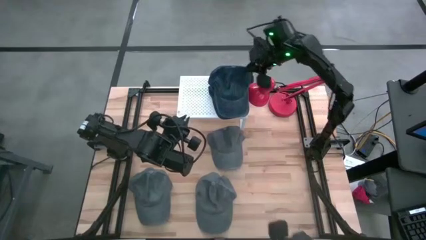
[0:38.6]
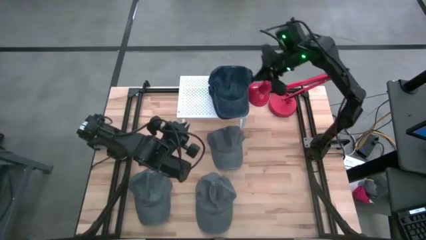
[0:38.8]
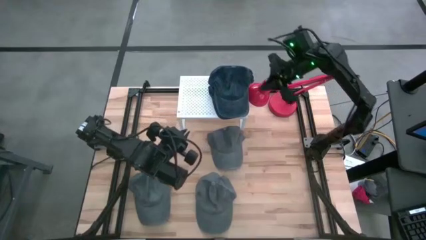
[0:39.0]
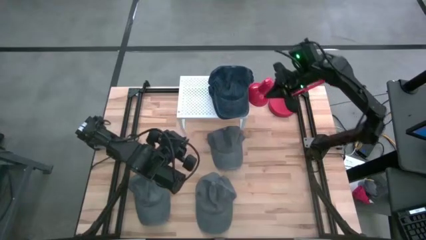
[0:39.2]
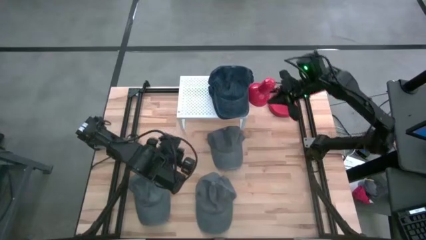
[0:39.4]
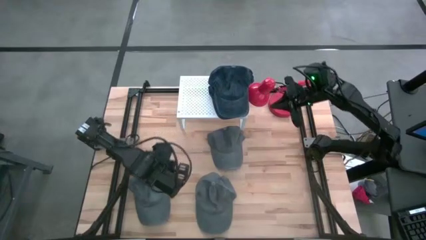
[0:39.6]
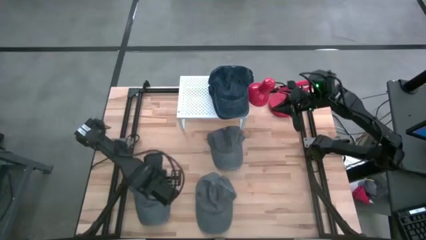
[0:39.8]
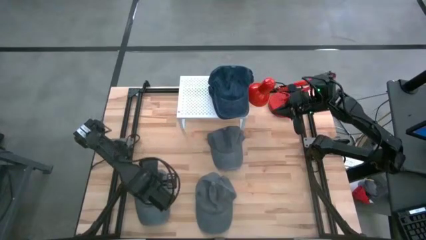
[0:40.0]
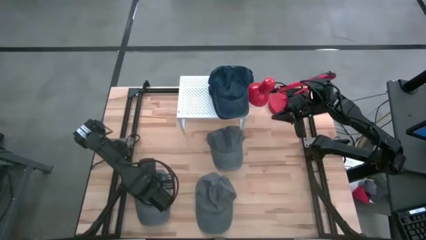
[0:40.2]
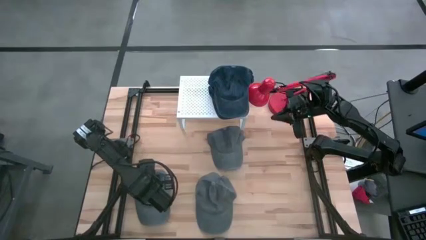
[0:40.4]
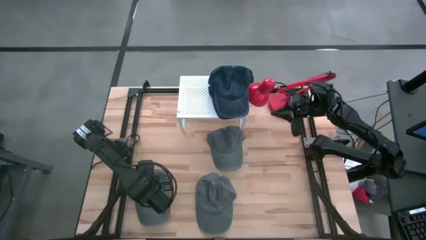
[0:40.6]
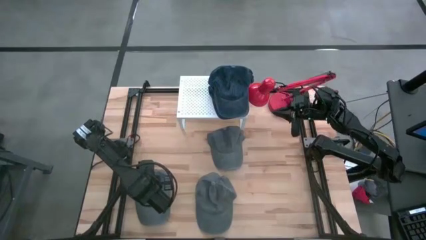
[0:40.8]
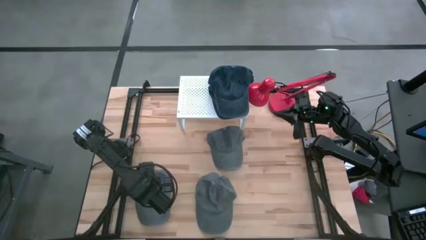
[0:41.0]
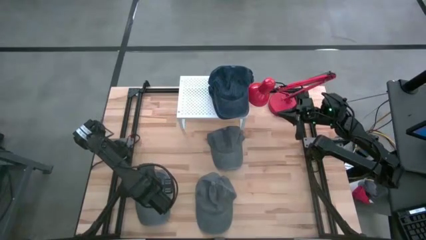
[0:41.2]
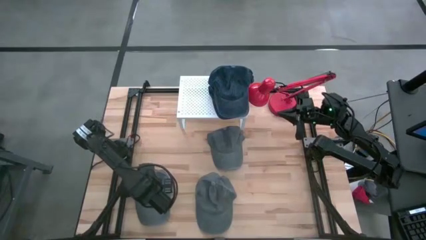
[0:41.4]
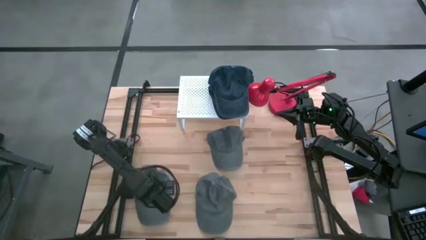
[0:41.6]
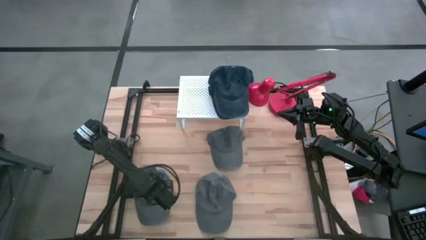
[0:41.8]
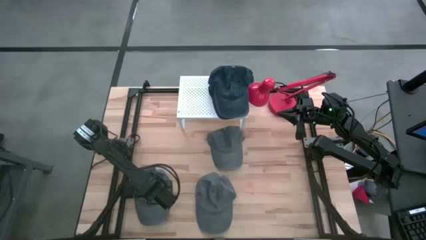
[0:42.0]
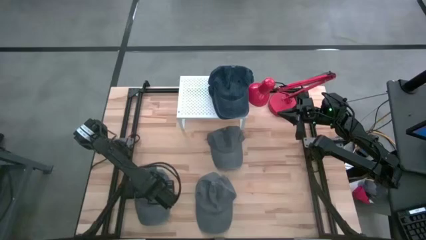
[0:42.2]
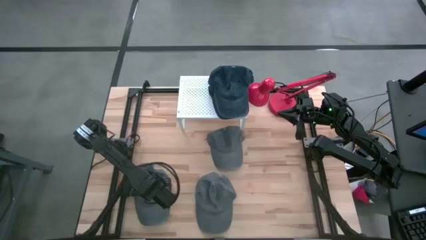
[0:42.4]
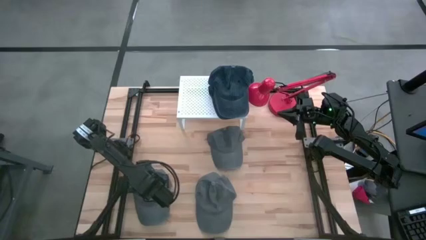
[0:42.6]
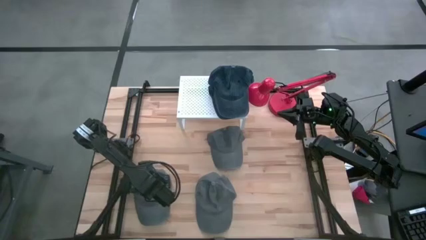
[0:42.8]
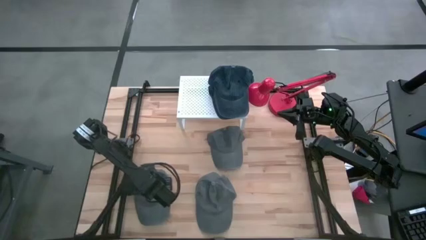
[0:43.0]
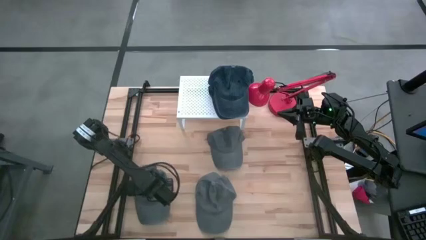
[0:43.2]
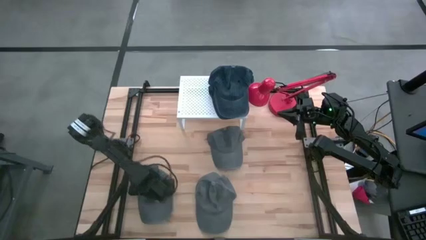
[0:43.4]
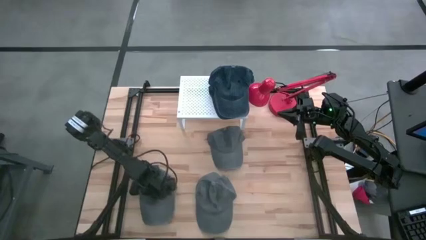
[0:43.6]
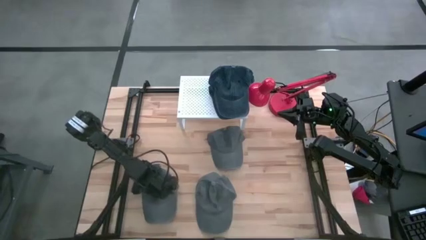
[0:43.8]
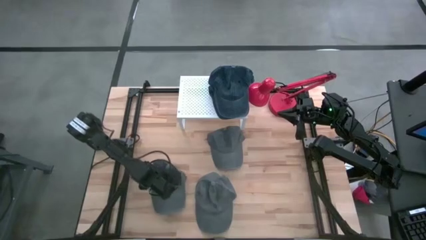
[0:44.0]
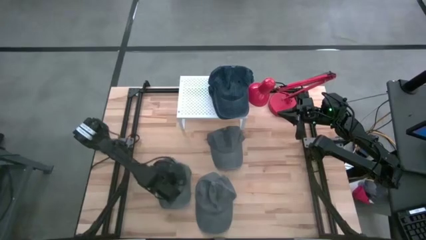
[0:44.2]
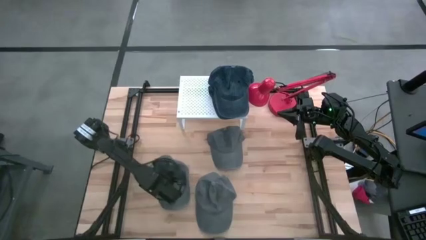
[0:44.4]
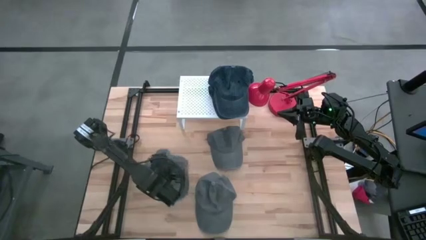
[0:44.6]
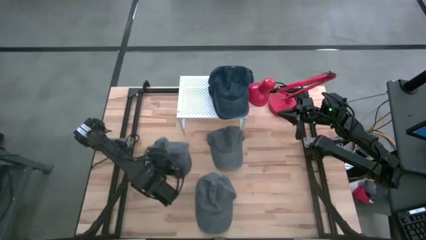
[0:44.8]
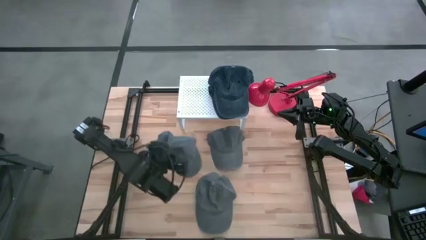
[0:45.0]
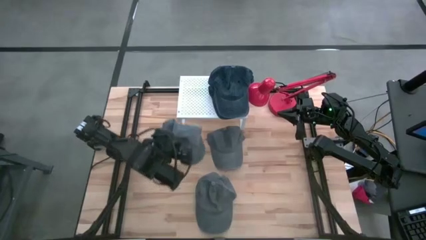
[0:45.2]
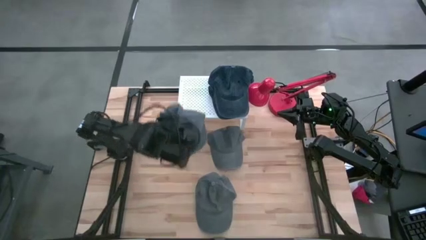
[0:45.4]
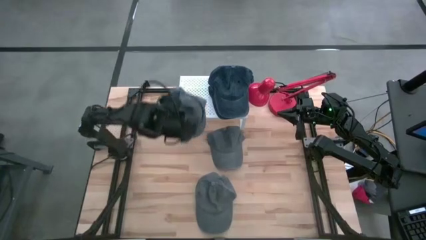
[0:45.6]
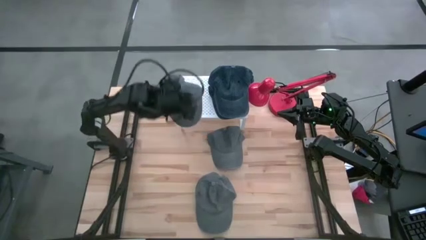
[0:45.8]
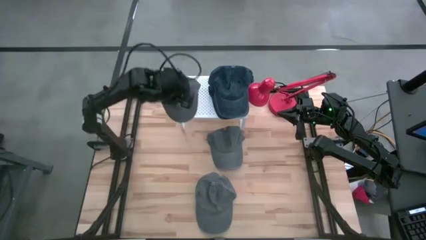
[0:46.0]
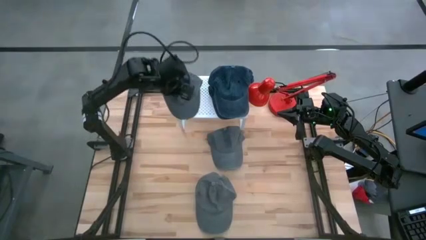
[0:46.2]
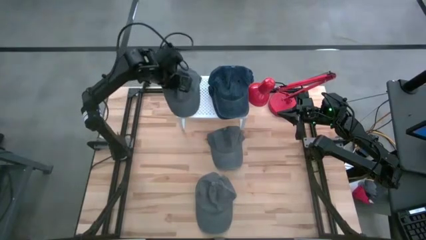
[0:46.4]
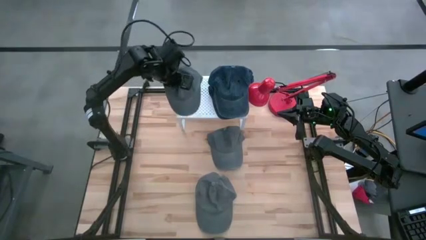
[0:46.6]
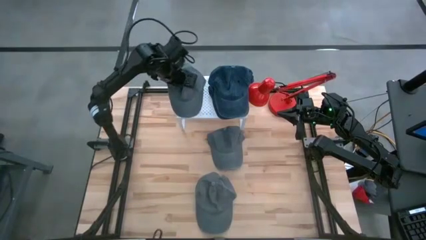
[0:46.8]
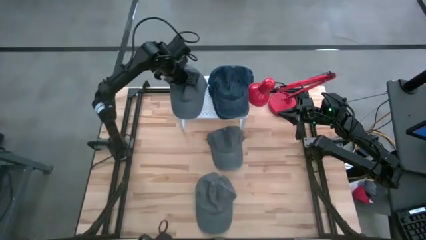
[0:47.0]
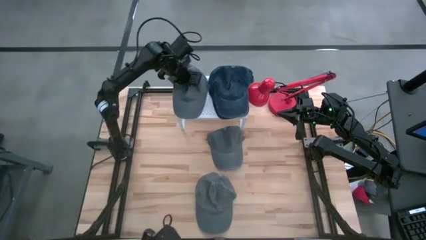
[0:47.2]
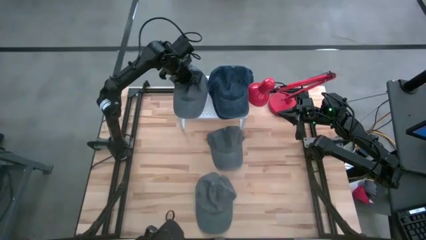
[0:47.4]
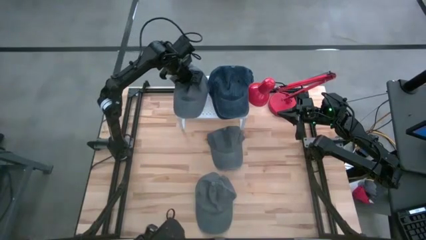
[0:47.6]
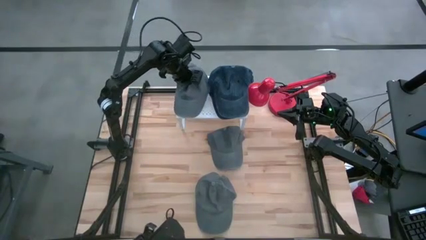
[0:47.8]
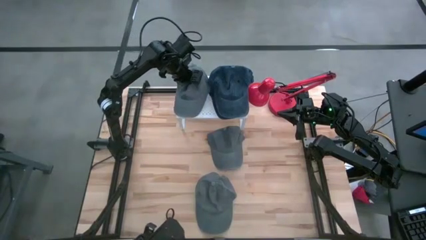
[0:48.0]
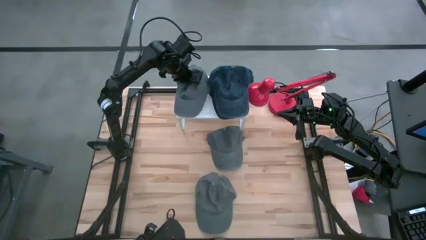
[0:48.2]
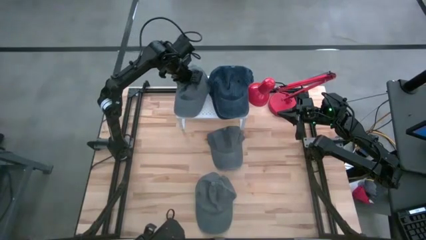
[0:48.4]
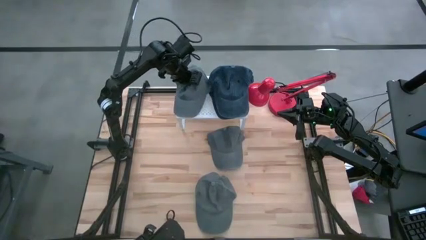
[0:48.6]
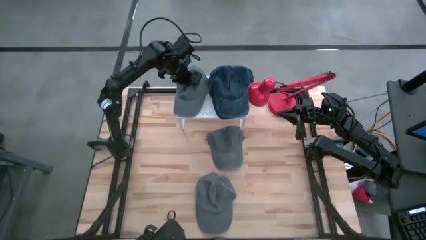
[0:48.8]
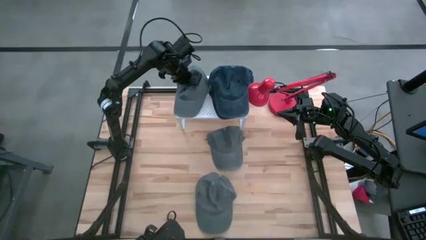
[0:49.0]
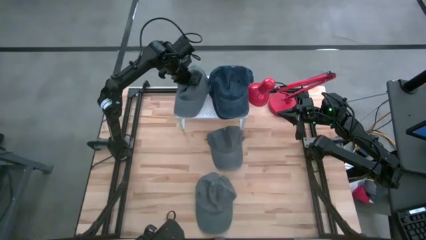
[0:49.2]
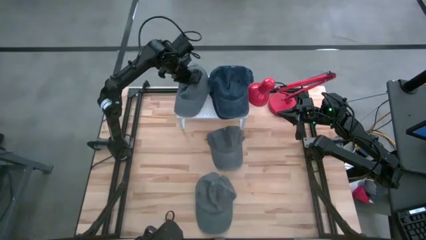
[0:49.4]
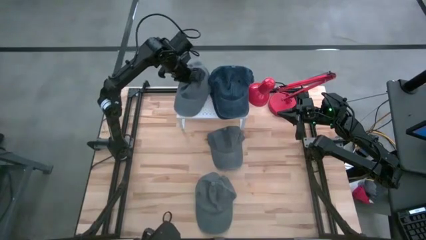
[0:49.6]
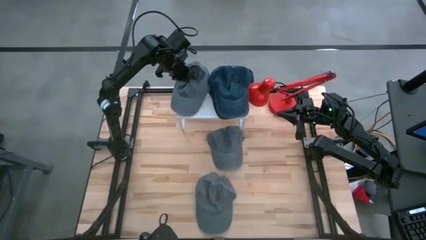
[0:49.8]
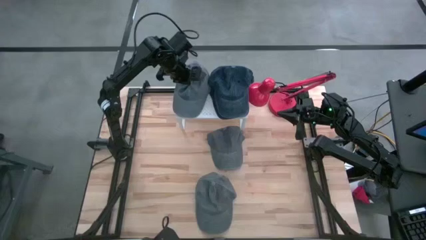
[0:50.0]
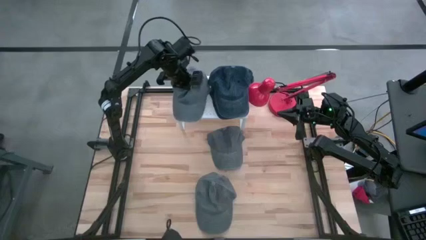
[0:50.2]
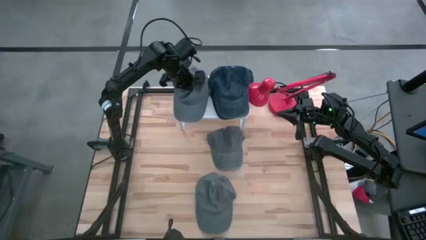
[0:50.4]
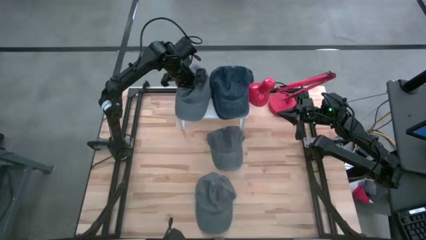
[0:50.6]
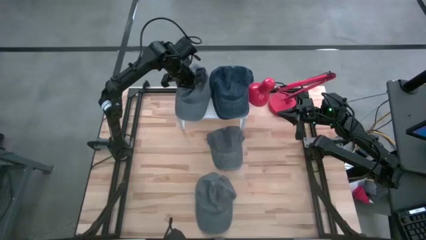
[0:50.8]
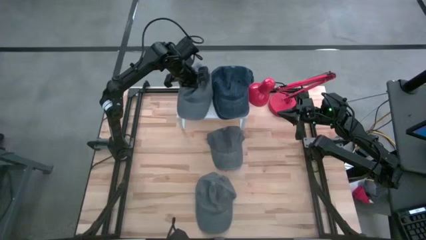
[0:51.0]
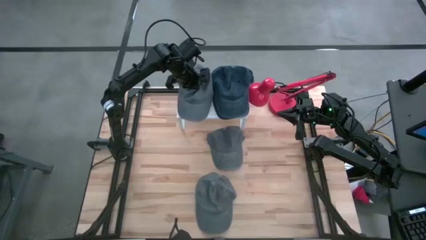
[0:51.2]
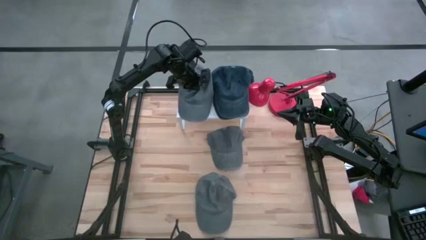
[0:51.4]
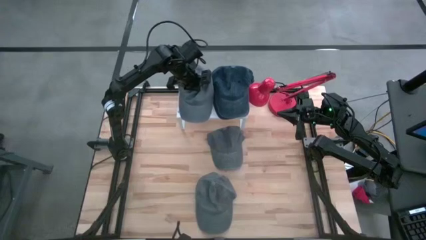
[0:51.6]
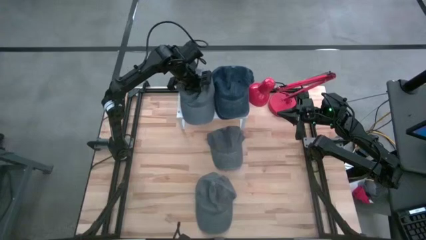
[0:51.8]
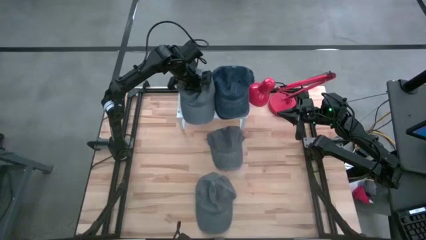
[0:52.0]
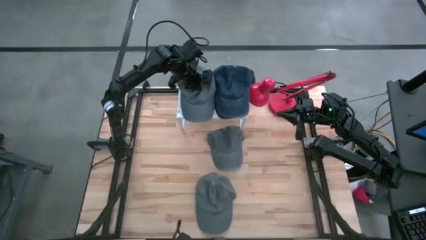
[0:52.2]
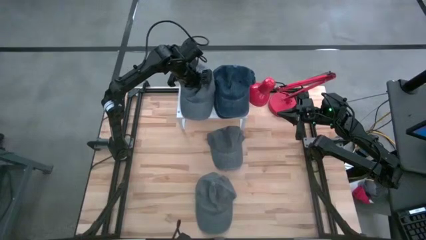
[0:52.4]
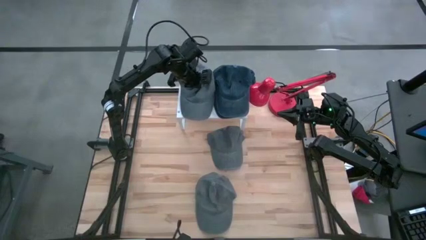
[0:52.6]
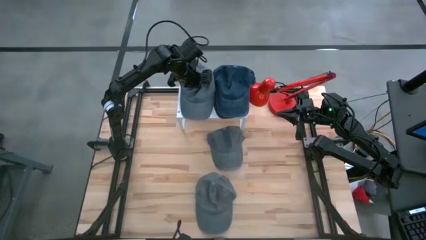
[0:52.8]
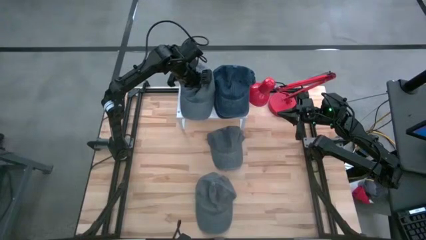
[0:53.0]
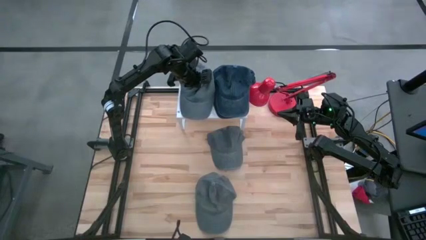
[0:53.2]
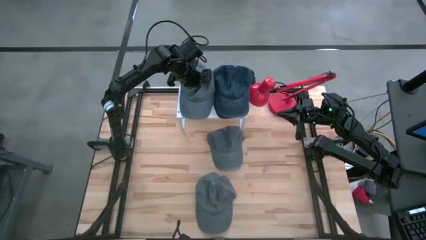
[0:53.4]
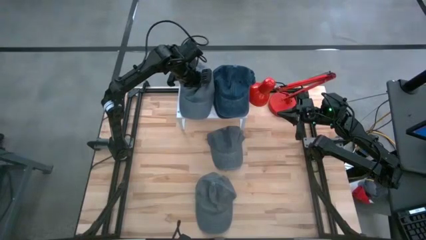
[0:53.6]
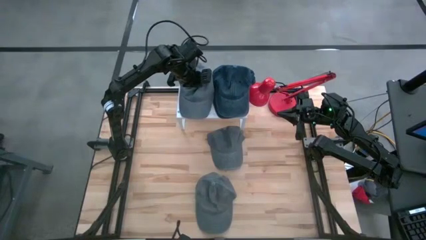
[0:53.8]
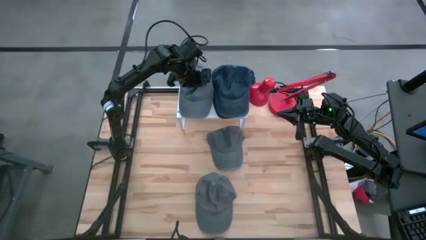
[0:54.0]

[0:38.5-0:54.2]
Task: Pick & Place hat
Put the bottom left light gray cap on the shelf
